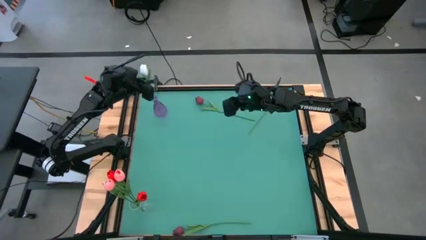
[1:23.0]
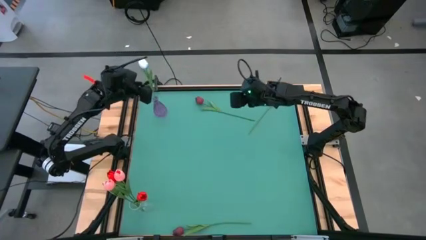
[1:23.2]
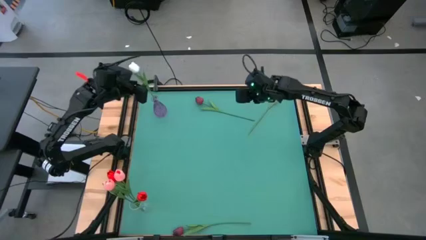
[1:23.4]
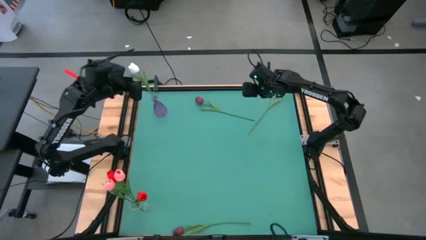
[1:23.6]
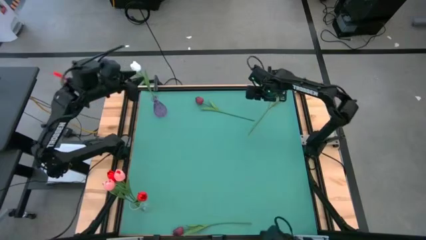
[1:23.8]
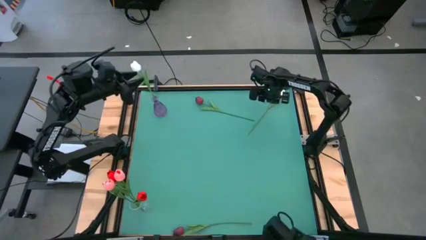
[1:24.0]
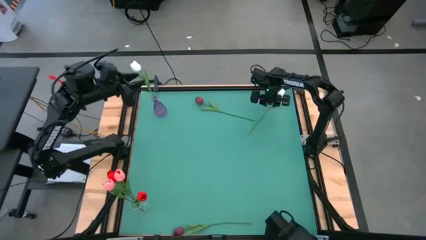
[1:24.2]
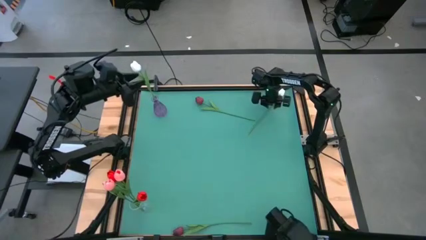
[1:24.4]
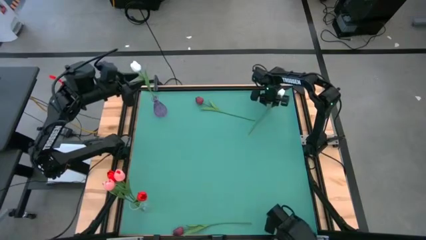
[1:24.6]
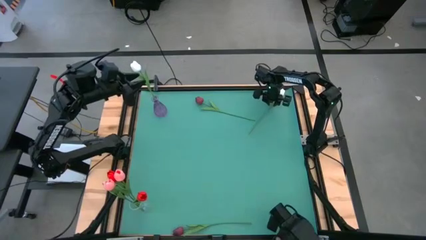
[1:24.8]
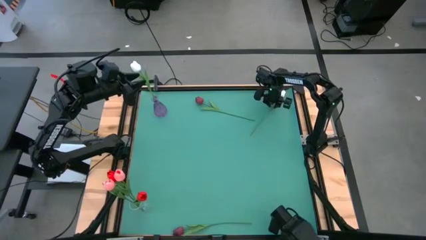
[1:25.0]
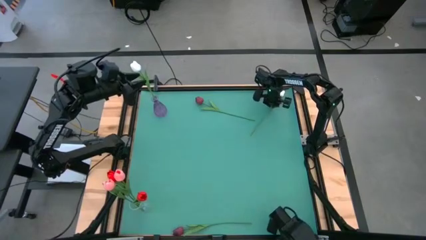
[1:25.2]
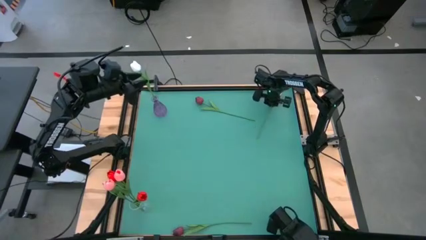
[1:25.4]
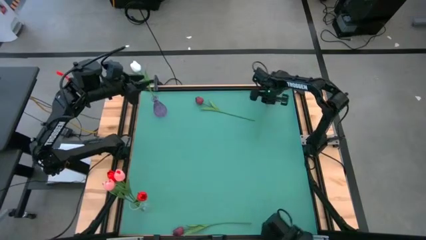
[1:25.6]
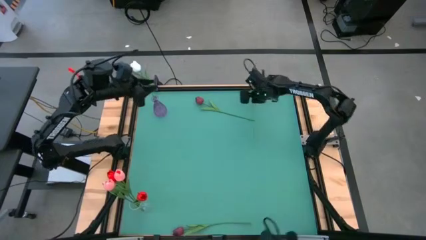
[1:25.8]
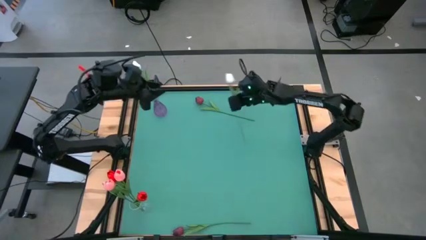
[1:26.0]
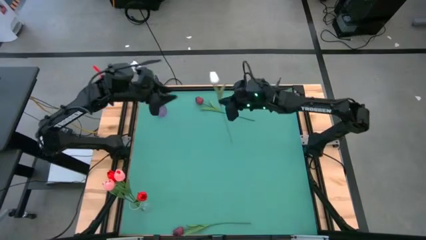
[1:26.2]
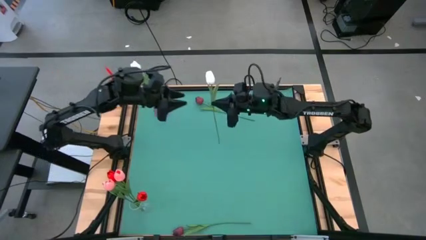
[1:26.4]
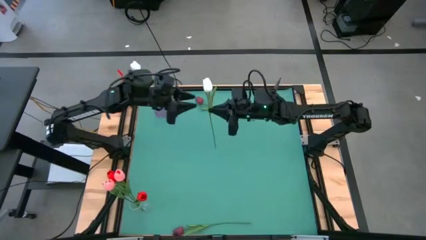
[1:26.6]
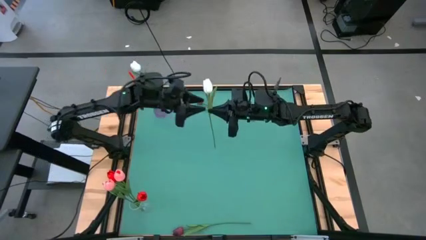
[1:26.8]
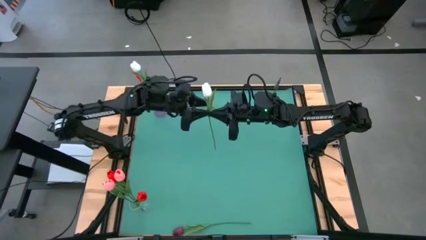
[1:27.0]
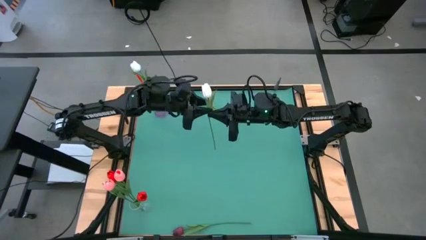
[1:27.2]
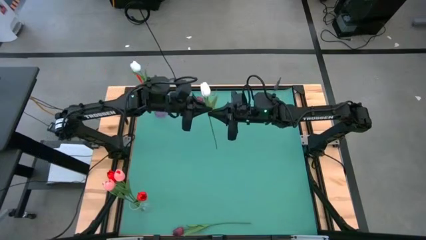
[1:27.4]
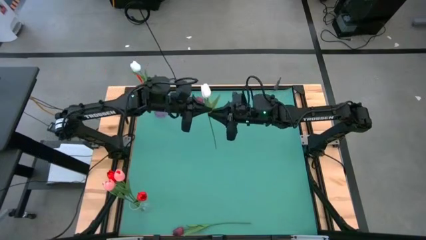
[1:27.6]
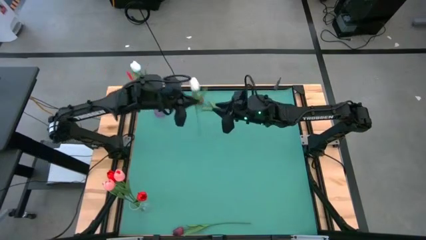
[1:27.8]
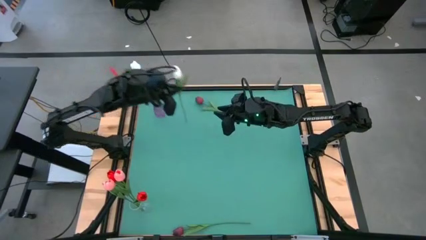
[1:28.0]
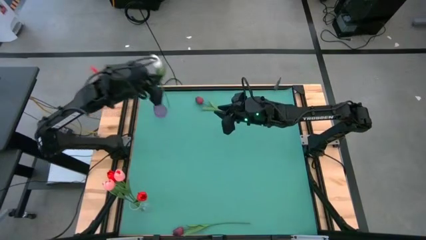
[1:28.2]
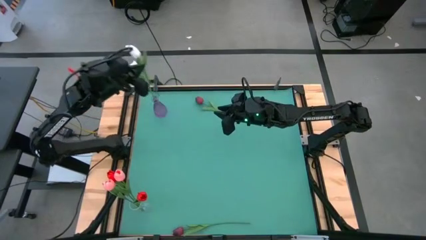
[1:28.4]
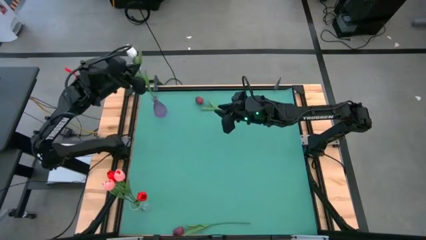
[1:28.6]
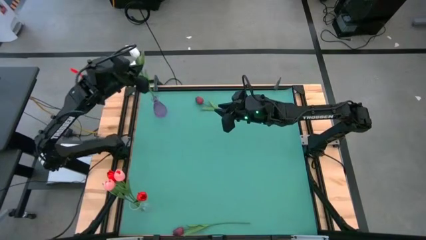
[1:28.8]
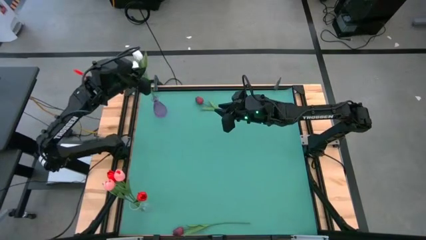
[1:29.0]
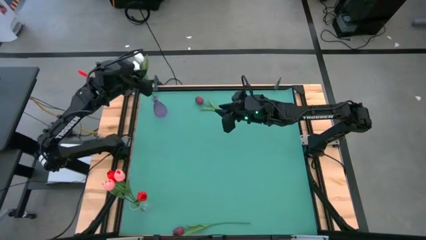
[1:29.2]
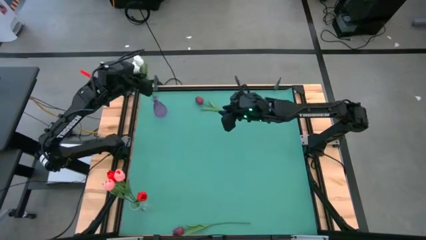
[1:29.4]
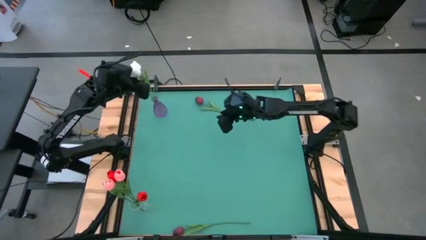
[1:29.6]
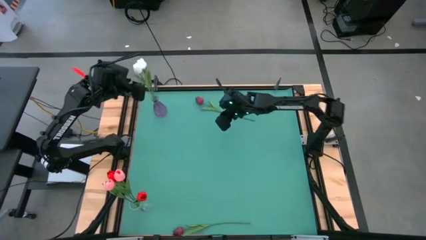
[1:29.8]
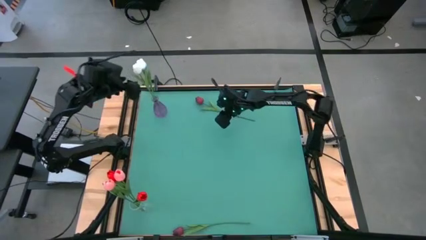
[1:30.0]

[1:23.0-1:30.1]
Task: Sort flowers into vase by color
Put the white flower into the violet vase

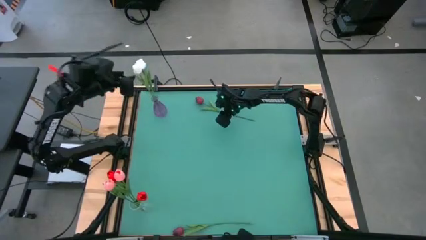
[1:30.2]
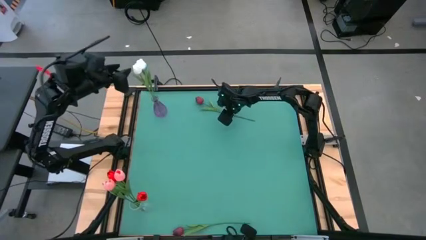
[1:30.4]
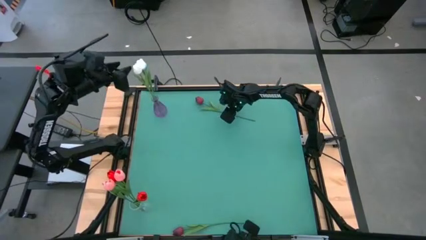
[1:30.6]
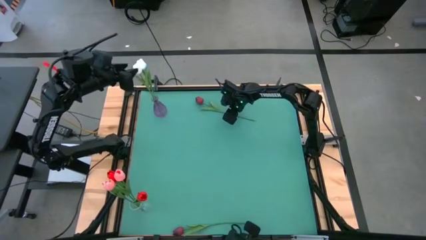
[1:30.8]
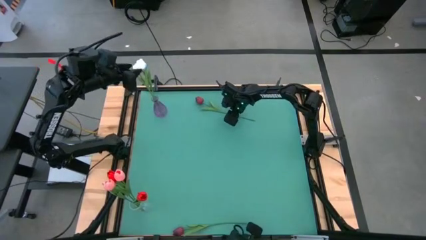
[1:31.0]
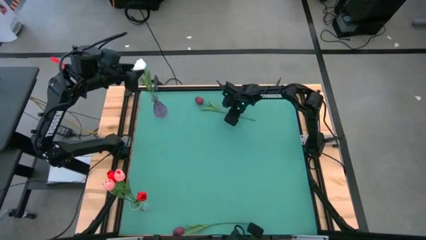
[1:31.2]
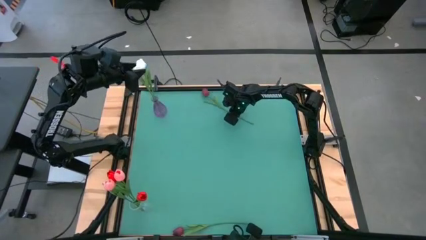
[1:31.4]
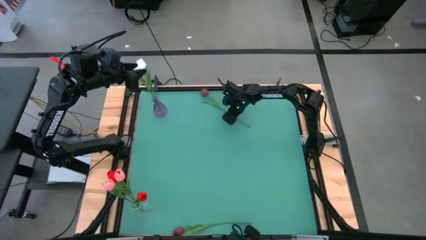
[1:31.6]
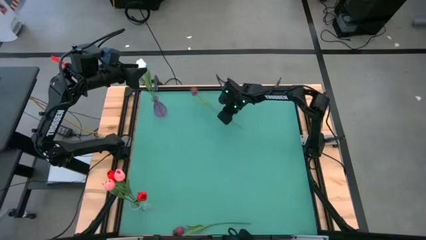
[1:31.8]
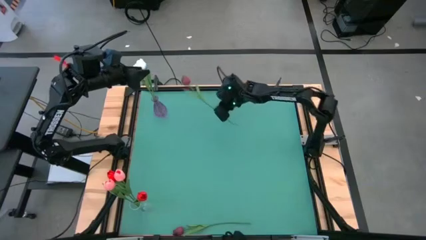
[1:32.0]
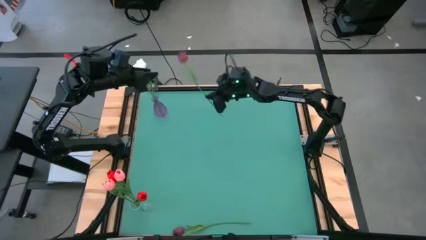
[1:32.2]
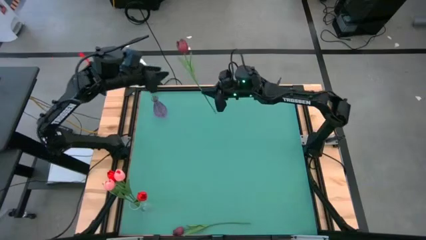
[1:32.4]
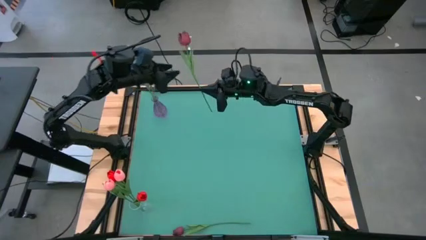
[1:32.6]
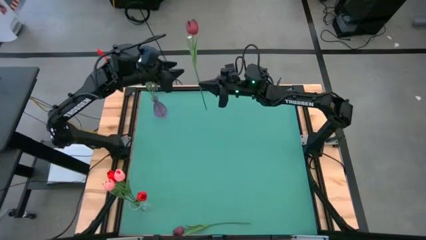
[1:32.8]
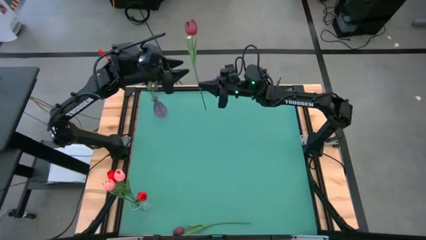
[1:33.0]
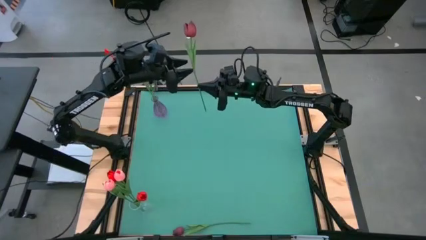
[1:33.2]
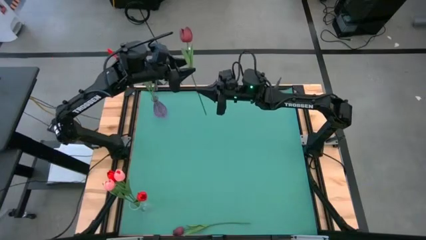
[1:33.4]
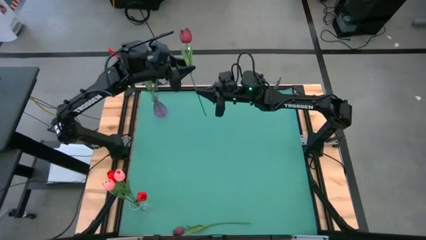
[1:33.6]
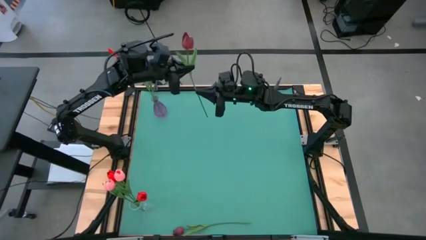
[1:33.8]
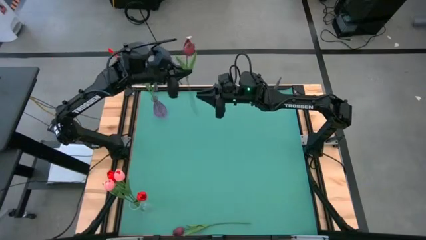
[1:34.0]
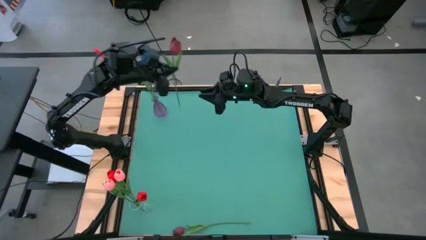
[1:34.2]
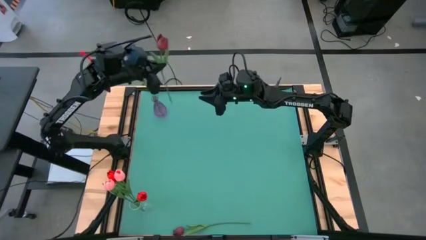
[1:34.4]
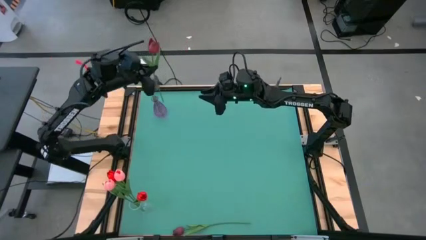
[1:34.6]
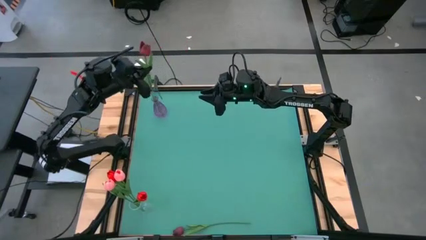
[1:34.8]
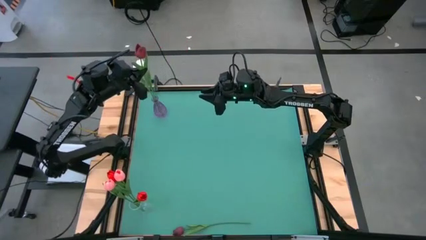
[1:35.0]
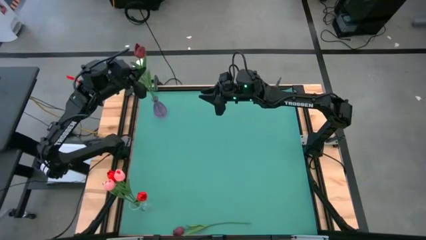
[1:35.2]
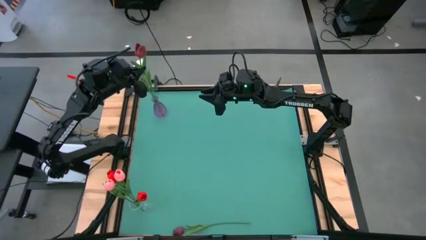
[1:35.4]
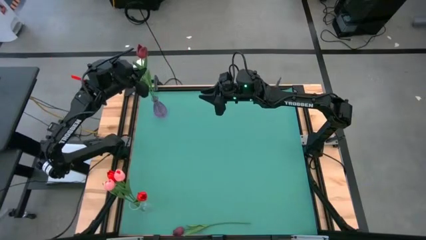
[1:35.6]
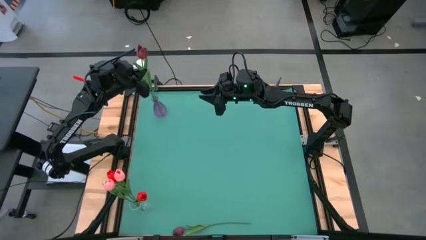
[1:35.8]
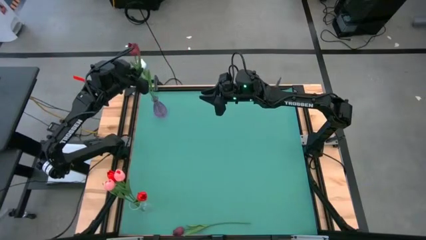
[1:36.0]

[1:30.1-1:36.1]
Put the top dark red flower into the violet vase

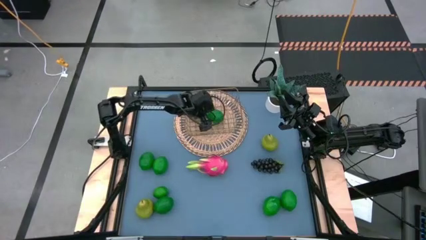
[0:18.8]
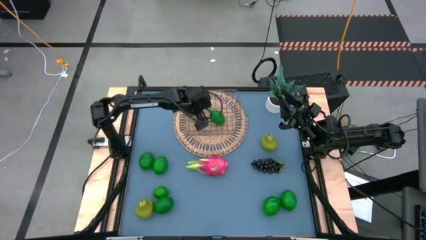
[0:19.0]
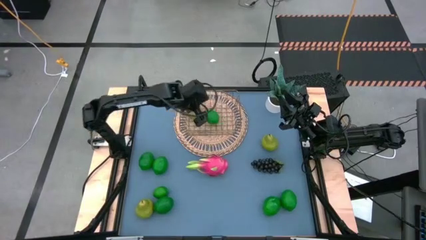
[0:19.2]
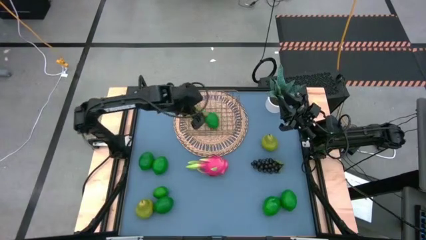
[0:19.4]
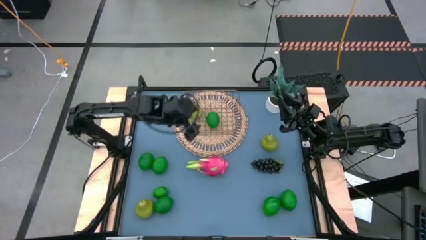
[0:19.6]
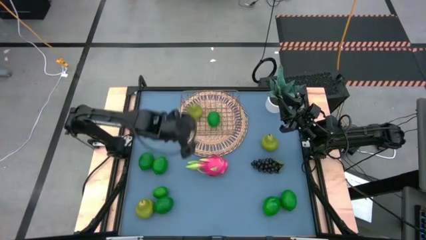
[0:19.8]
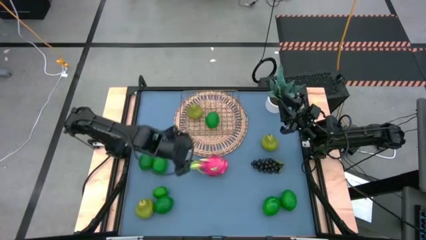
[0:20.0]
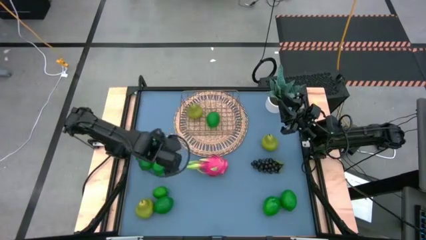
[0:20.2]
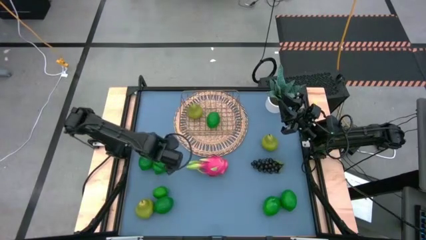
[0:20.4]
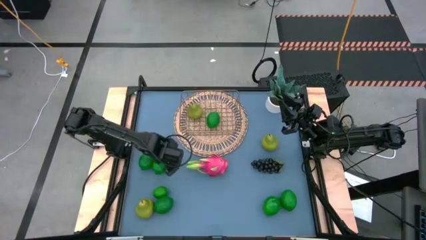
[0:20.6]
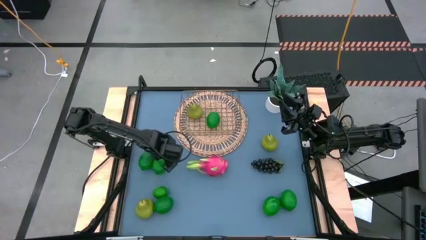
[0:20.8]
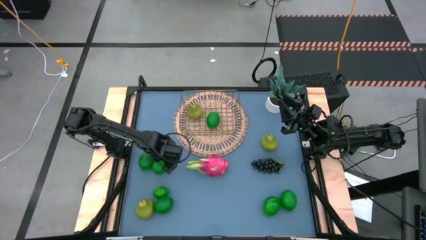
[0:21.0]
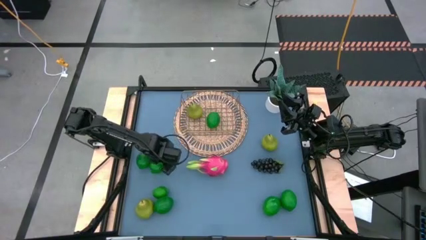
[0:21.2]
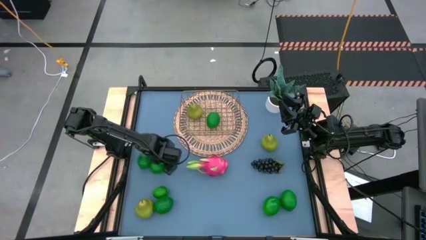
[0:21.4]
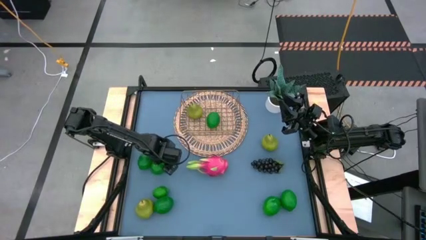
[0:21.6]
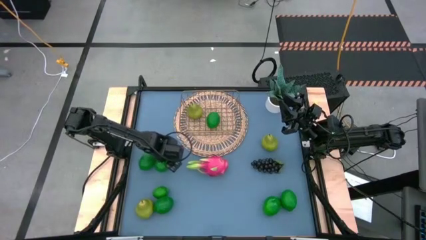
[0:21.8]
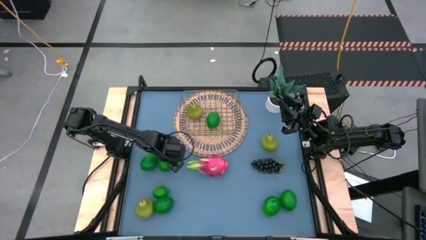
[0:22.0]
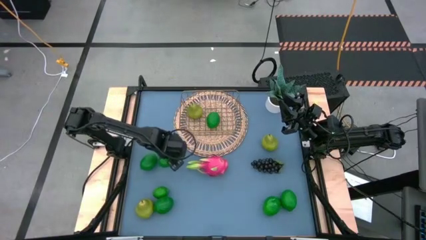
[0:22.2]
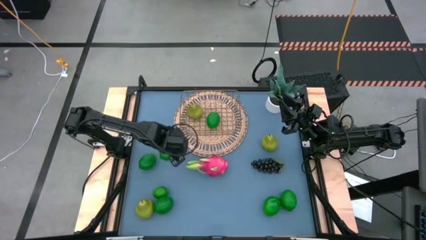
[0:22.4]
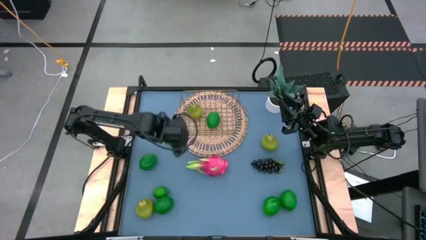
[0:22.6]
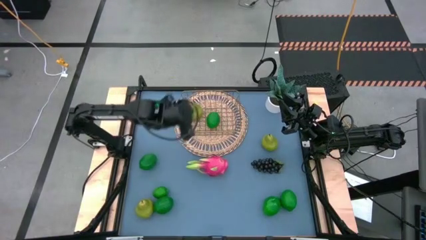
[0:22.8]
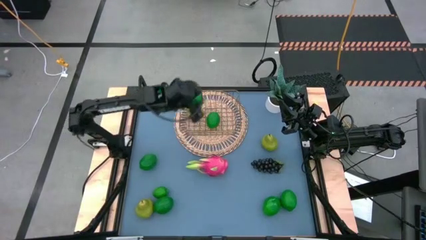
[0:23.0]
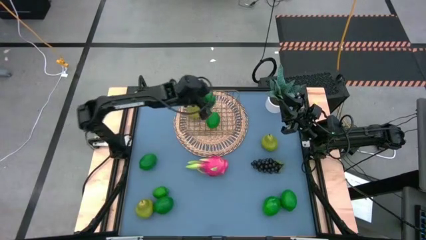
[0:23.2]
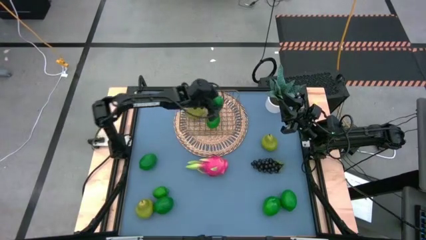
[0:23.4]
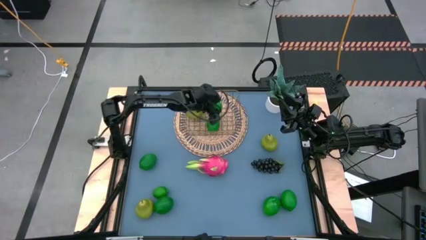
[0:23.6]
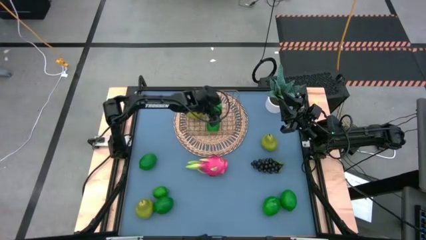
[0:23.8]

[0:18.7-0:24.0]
Task: Build produce basket
Put the green lime into the gold wire basket
